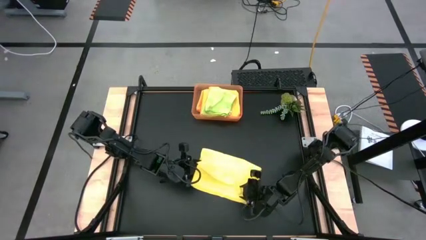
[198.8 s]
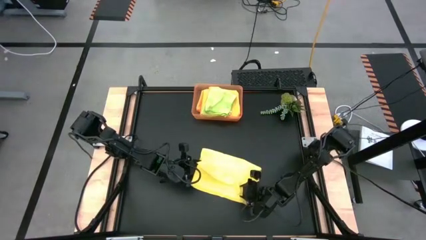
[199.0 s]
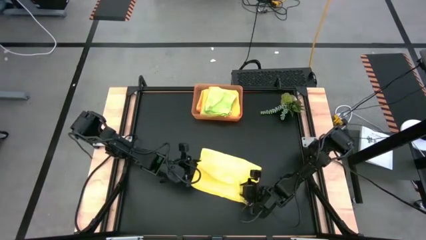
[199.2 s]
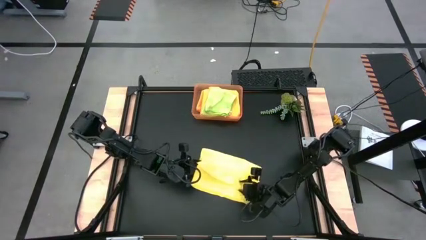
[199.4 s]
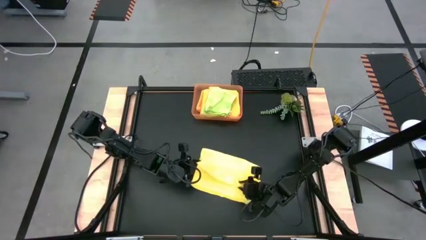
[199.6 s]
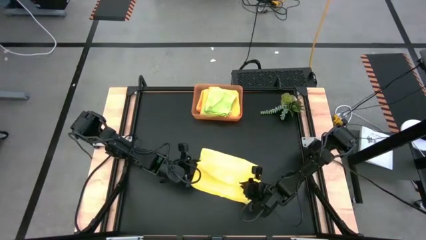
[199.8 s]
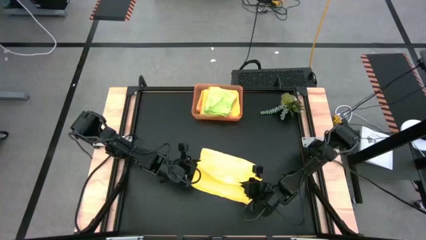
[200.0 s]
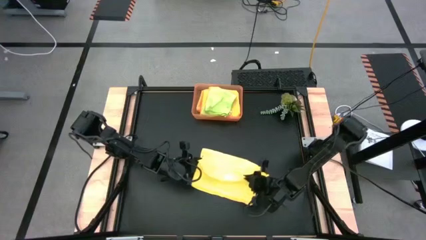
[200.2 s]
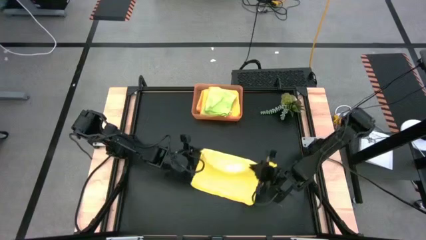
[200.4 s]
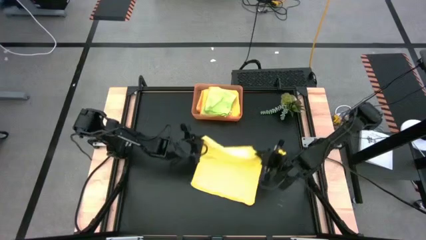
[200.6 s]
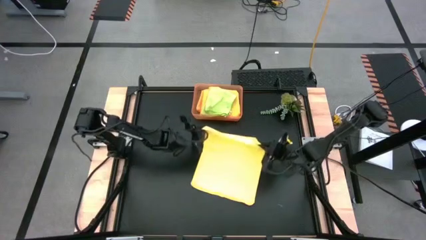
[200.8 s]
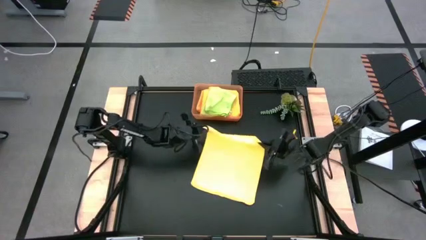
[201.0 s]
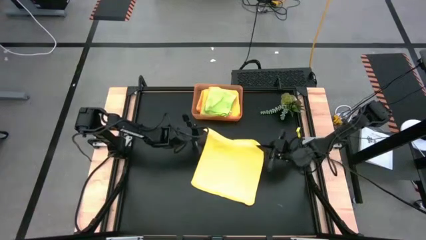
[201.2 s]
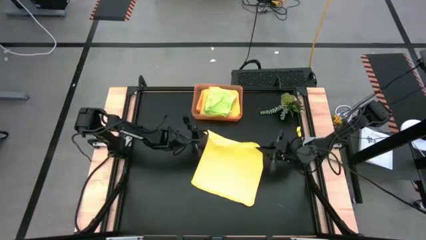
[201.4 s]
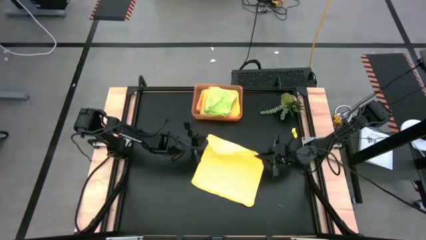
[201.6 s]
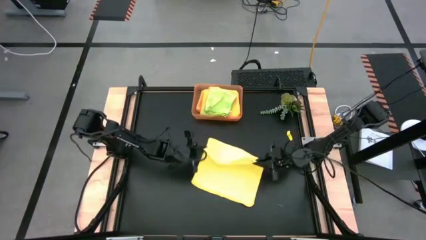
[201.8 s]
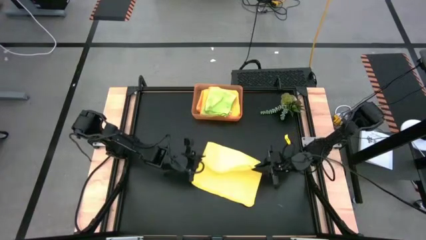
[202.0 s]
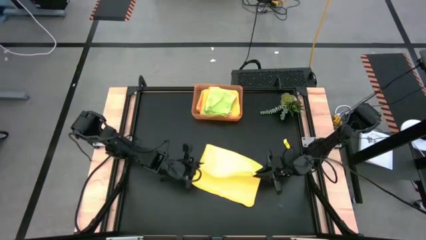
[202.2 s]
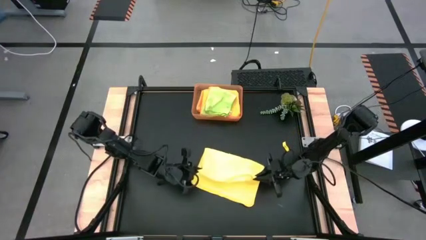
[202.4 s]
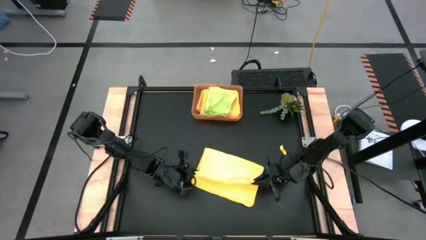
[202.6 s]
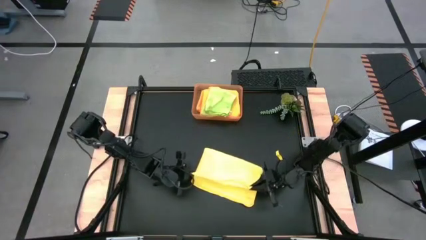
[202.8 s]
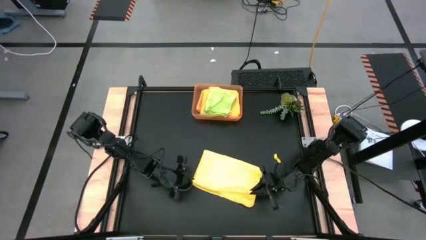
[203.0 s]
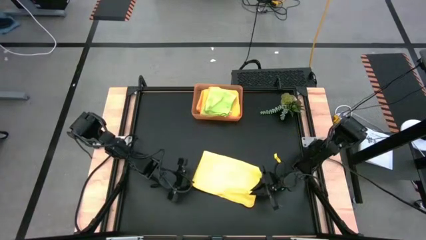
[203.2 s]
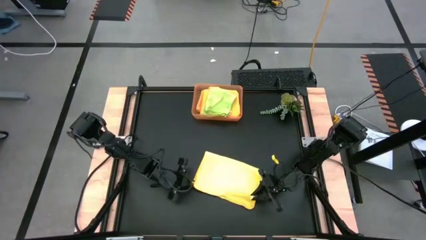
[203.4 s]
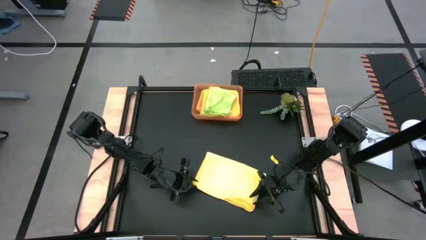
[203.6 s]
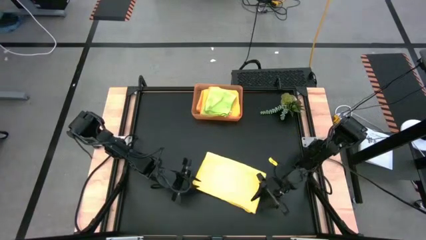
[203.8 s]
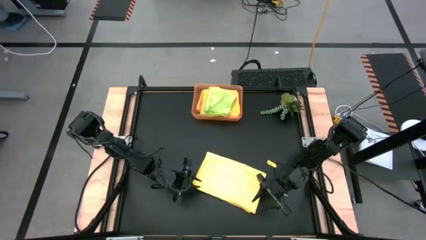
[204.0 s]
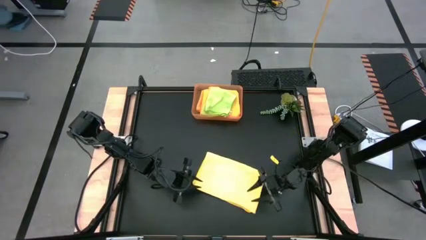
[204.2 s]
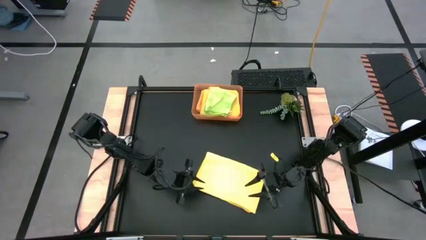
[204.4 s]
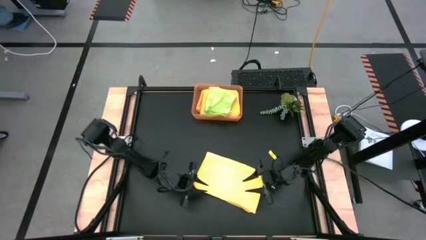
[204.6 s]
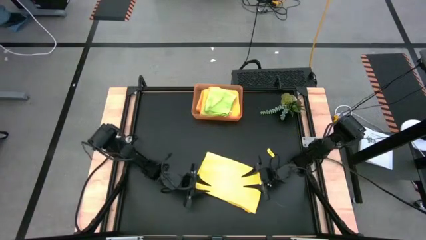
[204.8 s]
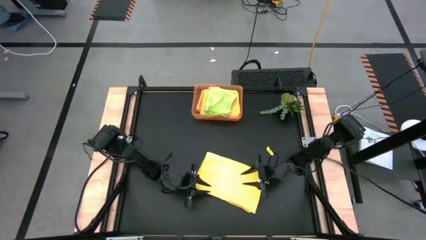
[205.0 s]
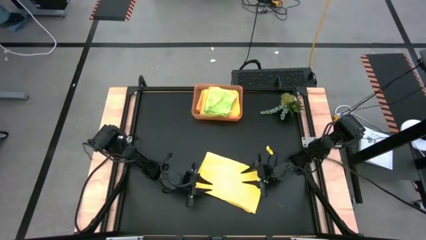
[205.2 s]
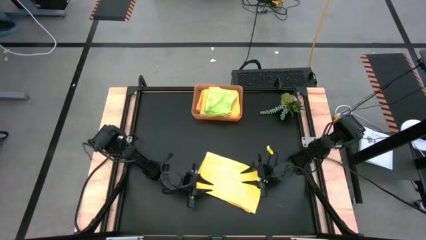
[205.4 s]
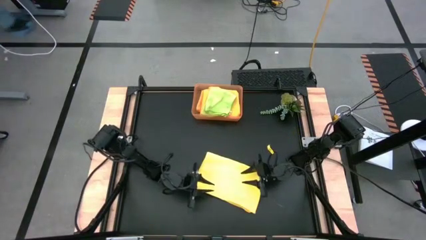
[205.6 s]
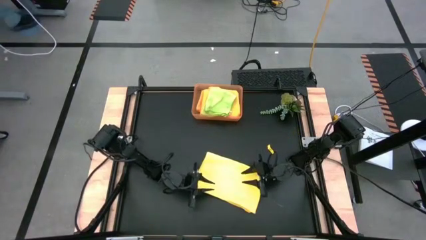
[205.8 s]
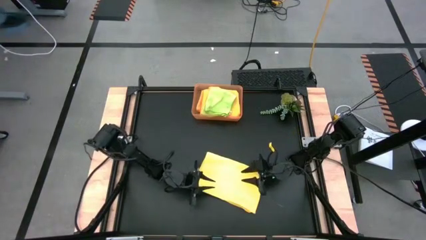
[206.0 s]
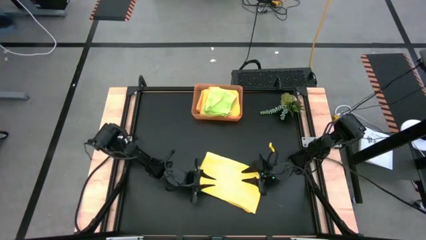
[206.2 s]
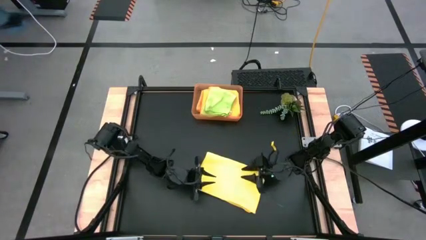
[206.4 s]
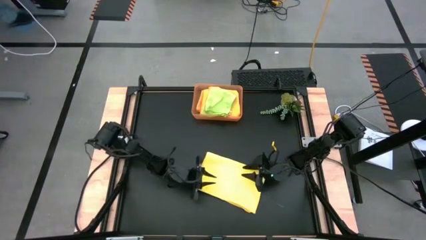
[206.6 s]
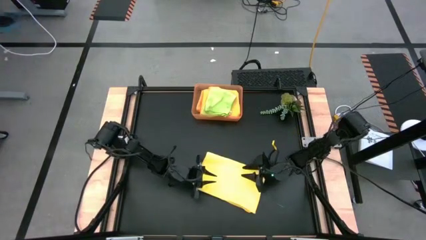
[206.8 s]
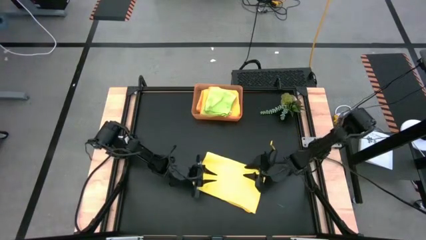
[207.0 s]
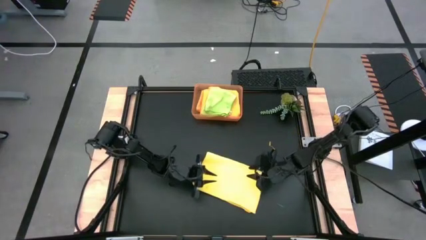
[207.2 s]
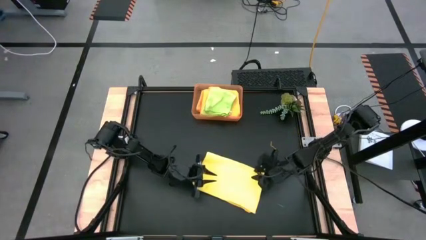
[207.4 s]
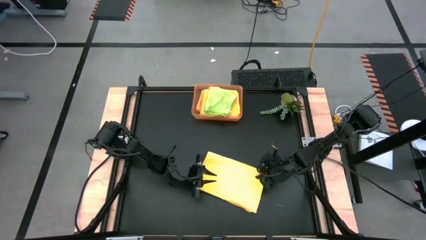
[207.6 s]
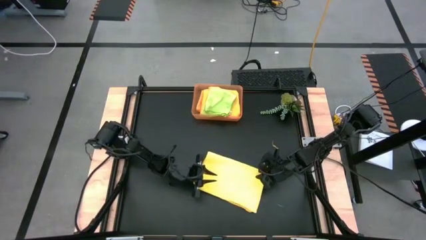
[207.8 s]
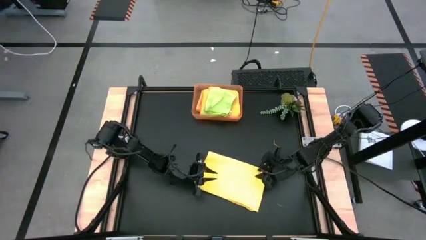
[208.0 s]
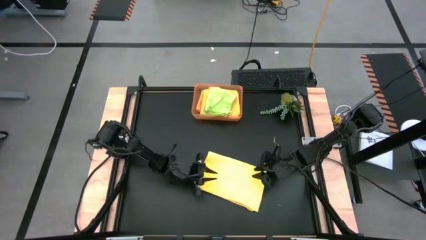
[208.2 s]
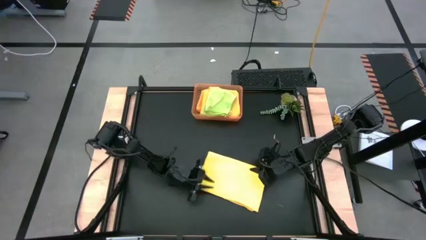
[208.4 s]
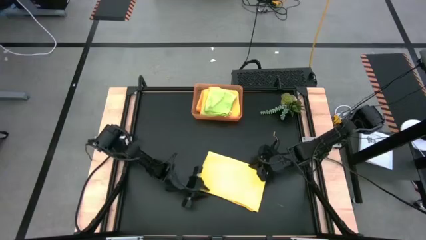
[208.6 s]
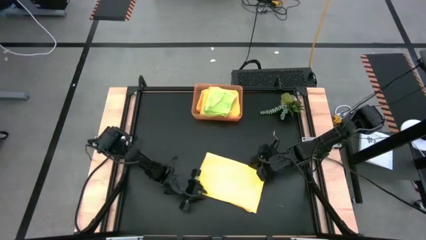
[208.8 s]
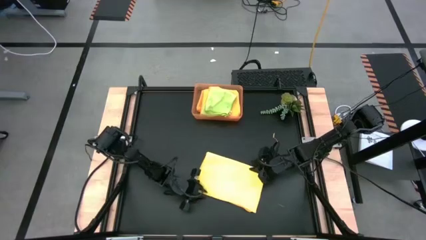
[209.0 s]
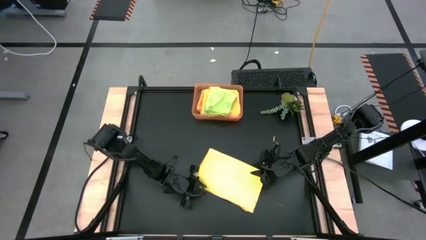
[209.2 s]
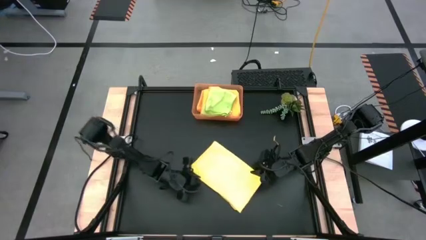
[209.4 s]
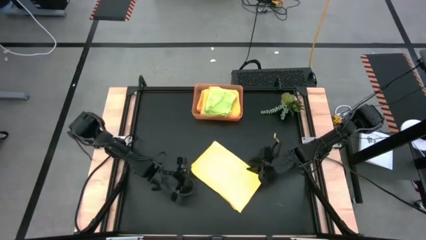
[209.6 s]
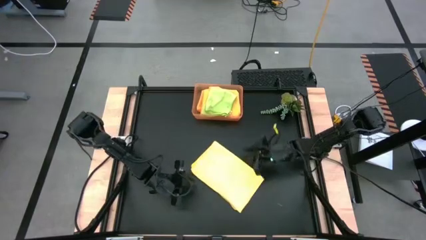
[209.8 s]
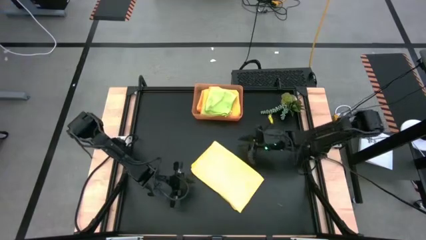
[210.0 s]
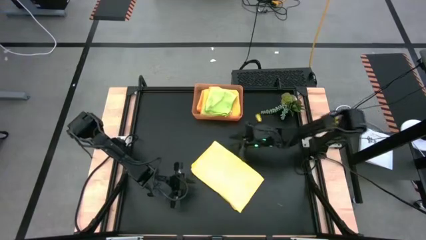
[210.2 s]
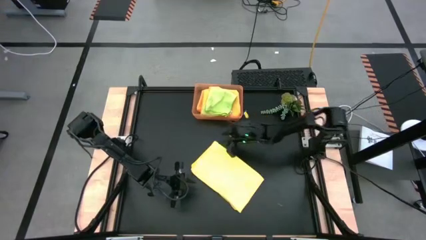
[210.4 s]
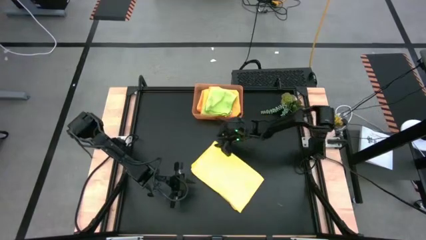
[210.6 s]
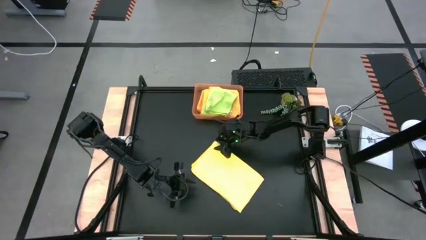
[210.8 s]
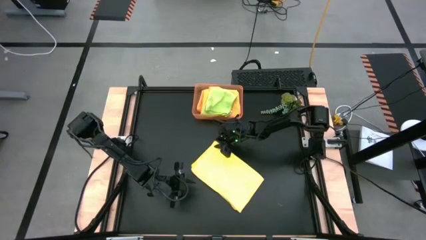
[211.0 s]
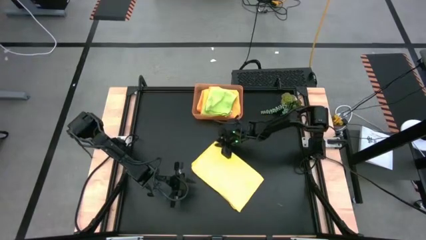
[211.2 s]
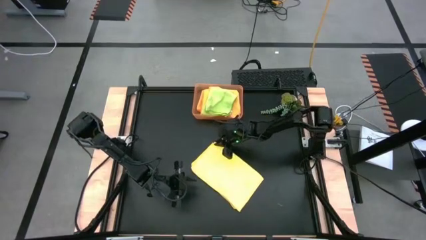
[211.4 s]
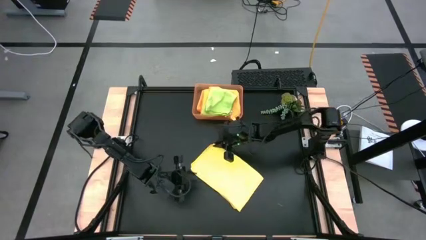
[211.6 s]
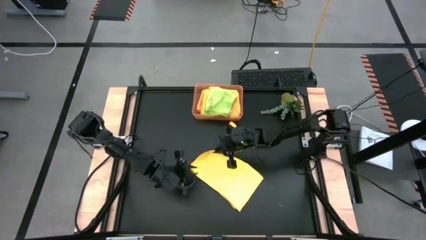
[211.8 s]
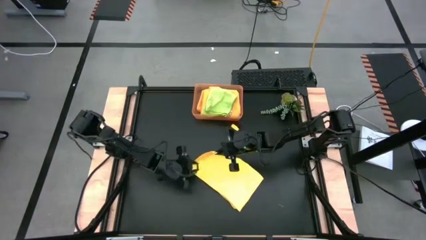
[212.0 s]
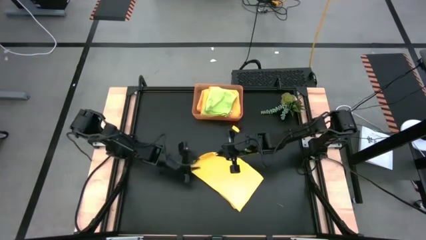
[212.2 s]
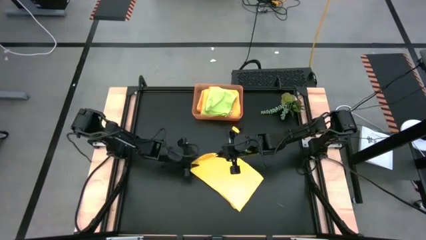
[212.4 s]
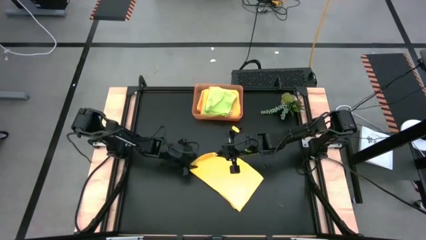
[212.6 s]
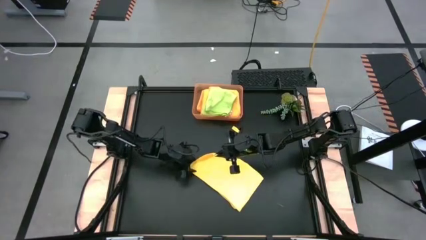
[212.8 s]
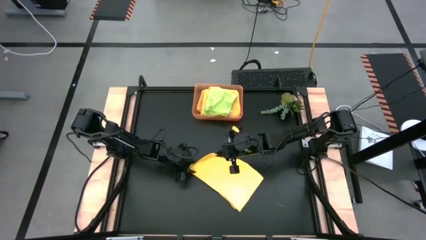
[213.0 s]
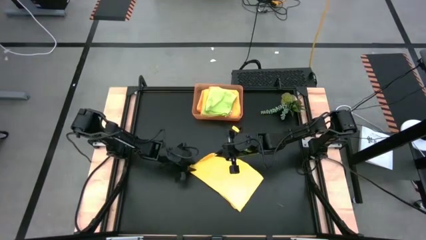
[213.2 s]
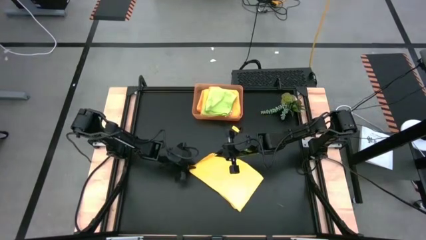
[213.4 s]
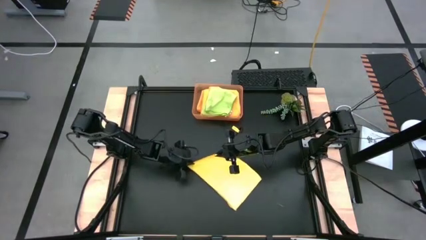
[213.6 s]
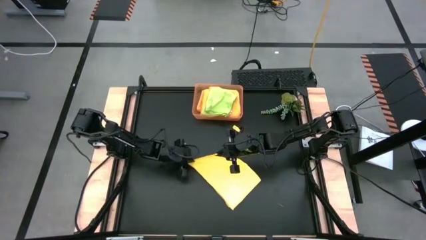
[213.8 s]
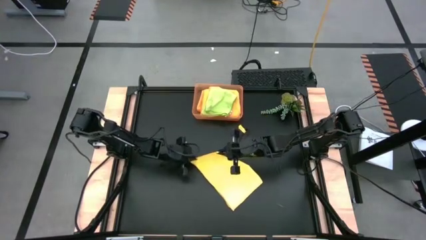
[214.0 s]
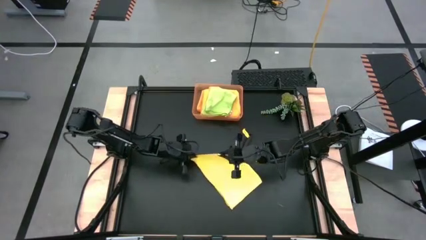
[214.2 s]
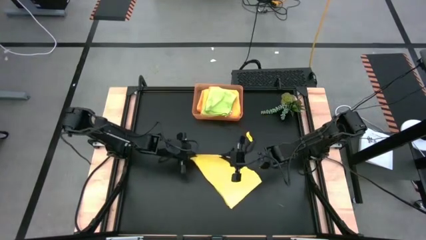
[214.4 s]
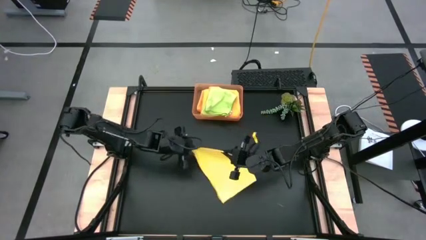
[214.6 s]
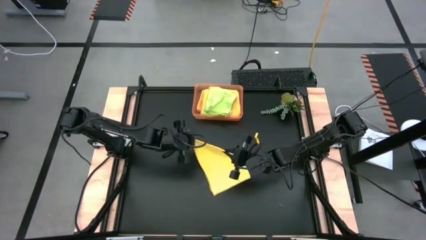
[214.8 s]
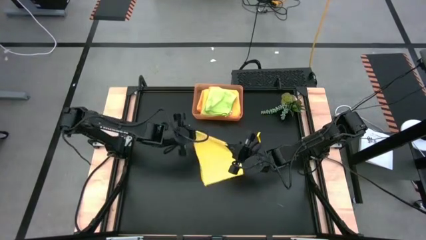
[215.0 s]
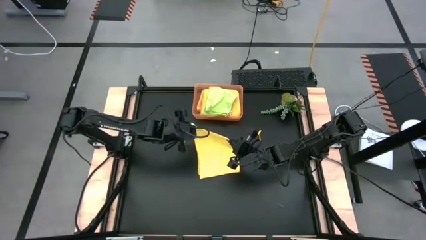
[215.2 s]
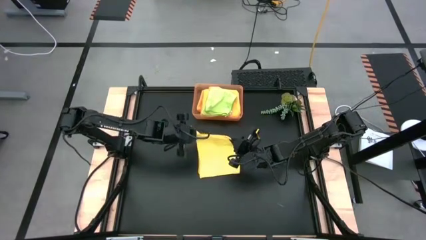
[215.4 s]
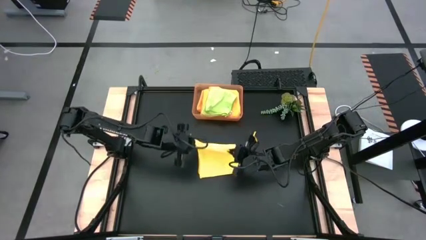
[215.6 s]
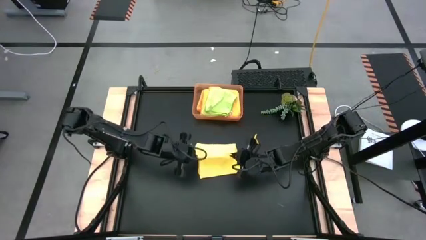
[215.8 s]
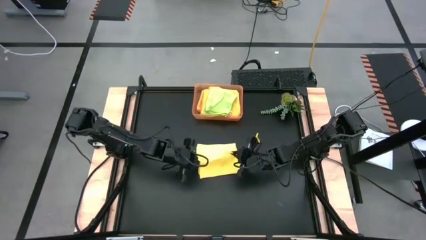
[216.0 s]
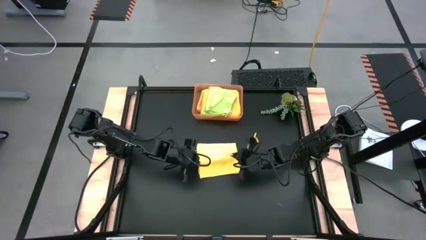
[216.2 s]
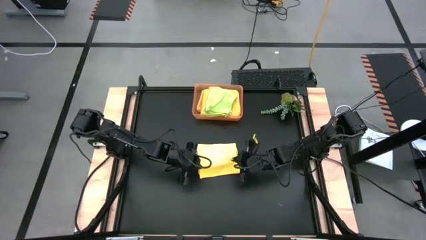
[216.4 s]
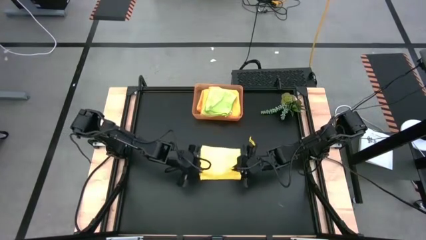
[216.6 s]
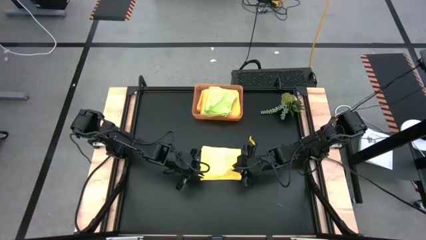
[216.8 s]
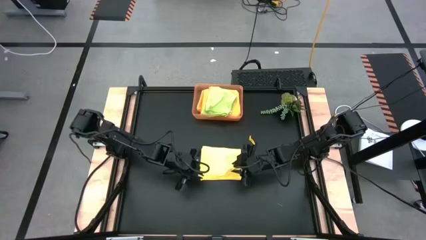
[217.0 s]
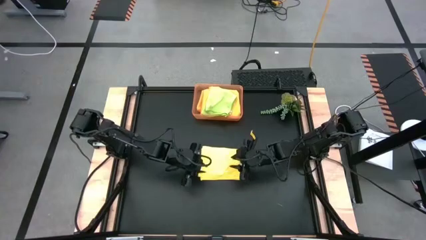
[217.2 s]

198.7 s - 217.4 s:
Task: Fold microfiber towels
Fold the yellow towel
